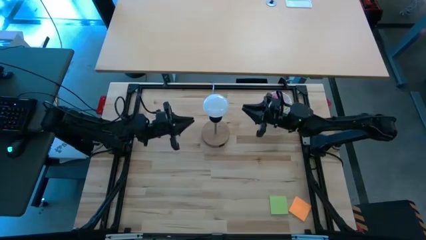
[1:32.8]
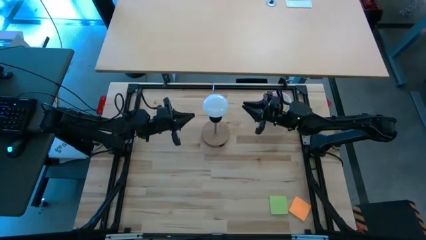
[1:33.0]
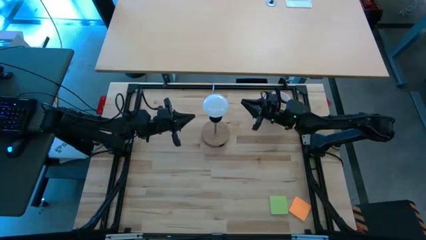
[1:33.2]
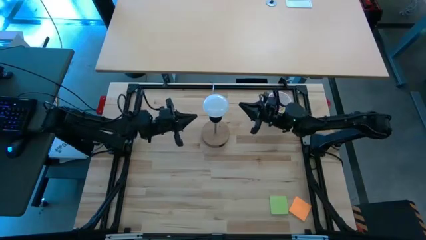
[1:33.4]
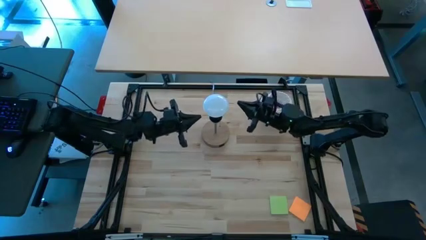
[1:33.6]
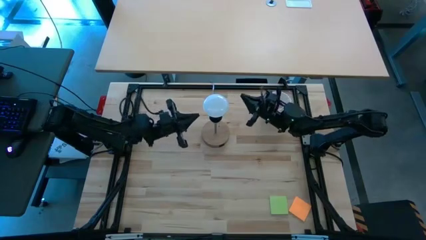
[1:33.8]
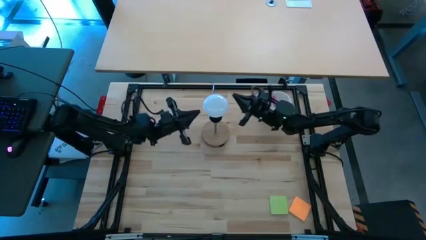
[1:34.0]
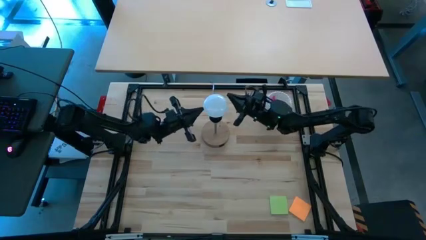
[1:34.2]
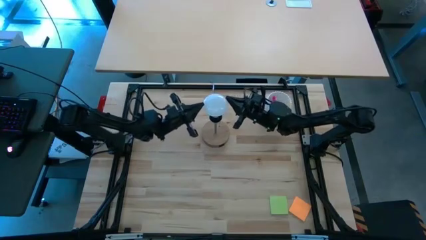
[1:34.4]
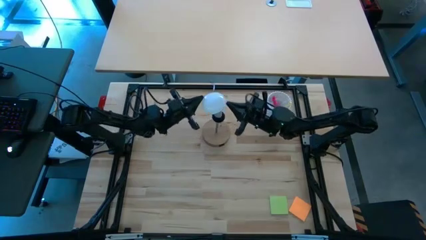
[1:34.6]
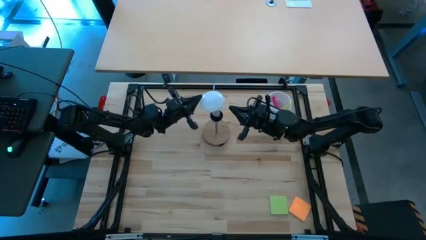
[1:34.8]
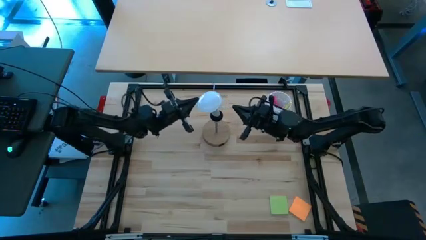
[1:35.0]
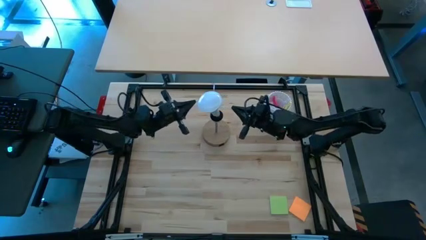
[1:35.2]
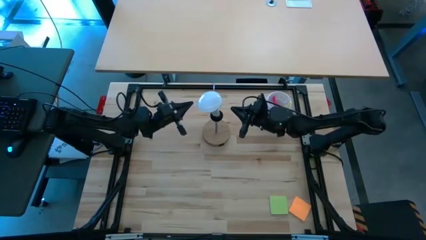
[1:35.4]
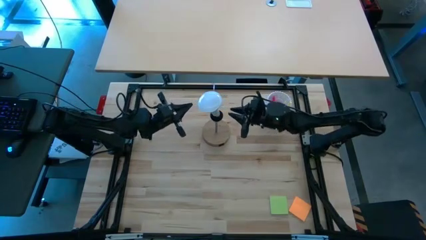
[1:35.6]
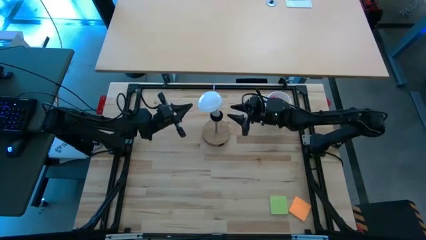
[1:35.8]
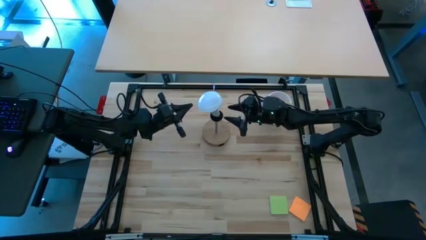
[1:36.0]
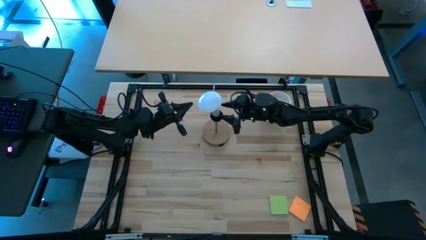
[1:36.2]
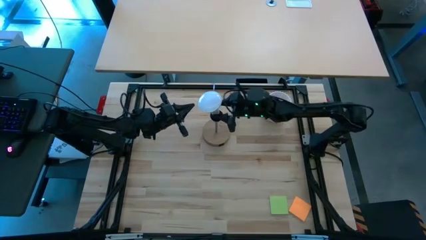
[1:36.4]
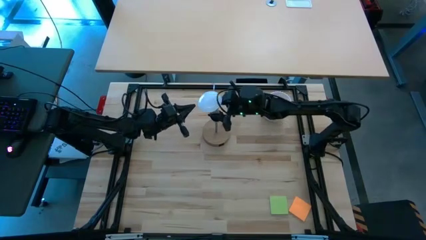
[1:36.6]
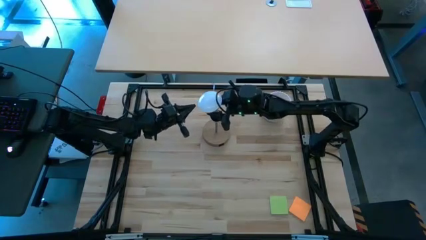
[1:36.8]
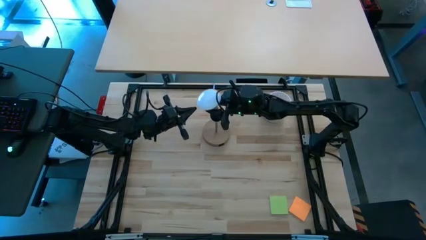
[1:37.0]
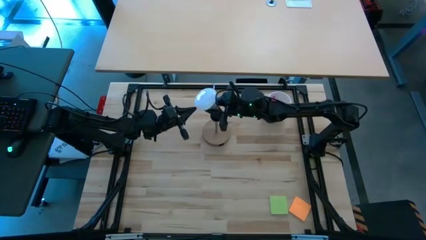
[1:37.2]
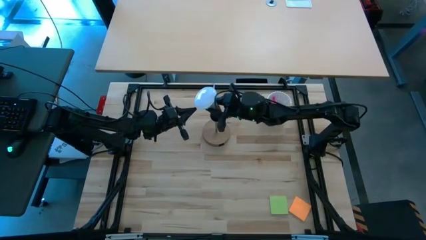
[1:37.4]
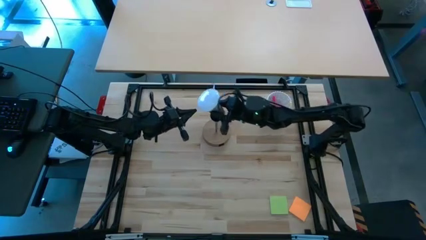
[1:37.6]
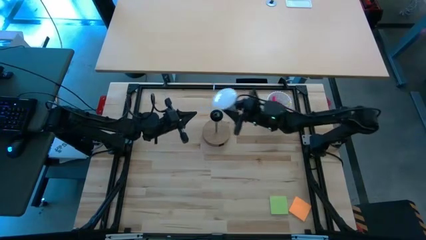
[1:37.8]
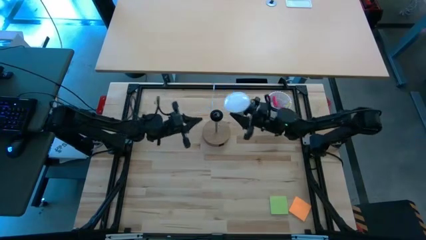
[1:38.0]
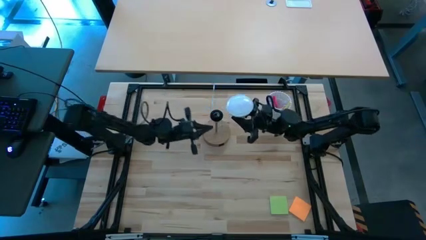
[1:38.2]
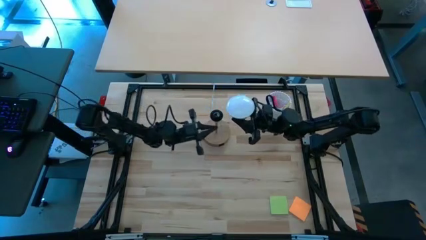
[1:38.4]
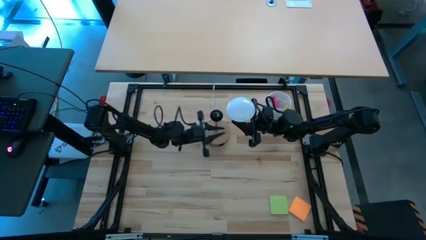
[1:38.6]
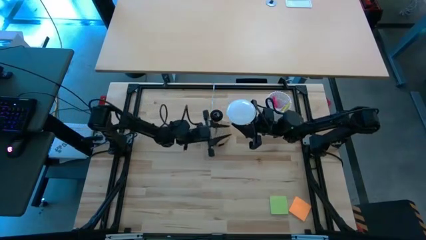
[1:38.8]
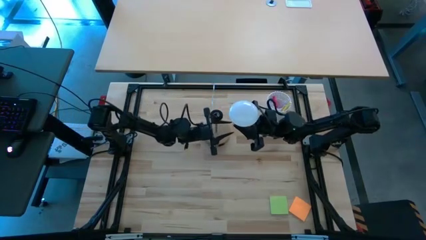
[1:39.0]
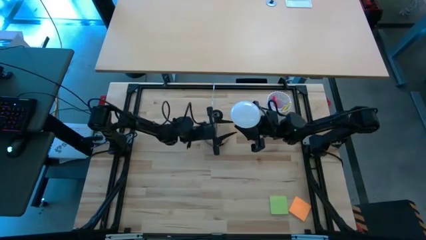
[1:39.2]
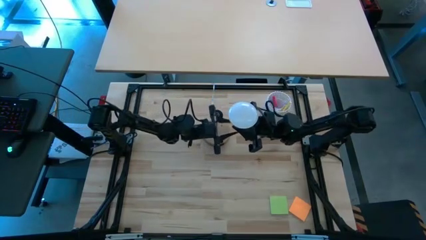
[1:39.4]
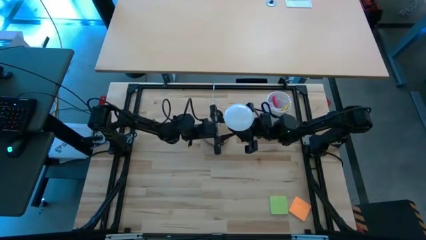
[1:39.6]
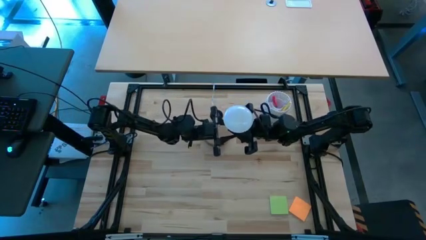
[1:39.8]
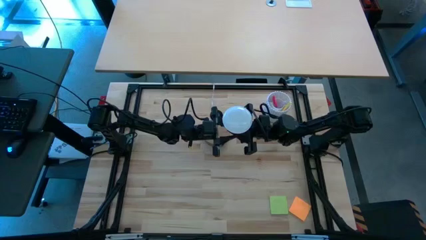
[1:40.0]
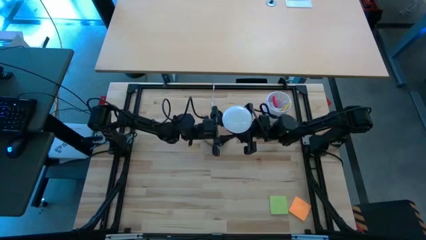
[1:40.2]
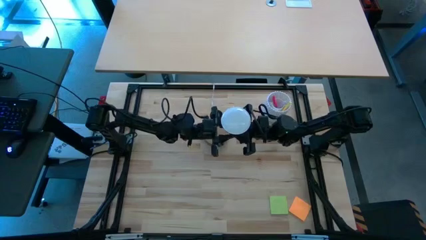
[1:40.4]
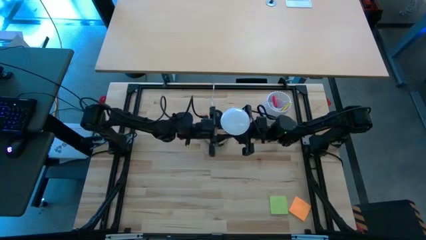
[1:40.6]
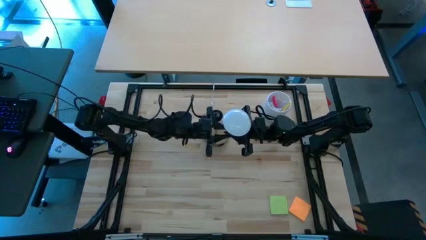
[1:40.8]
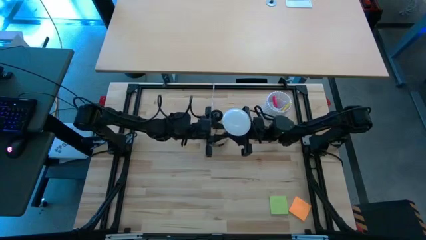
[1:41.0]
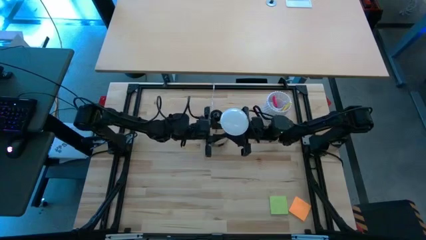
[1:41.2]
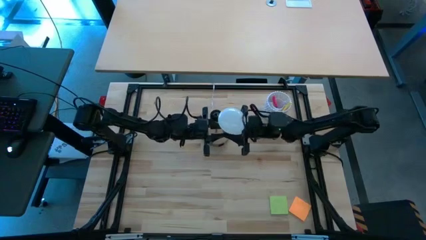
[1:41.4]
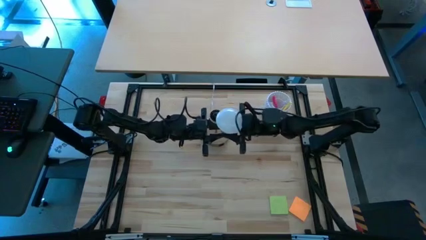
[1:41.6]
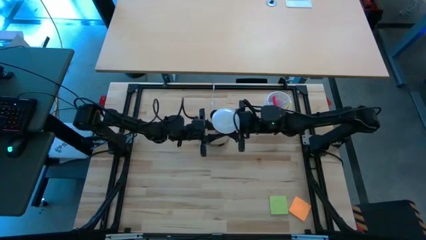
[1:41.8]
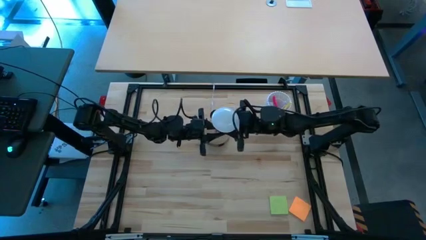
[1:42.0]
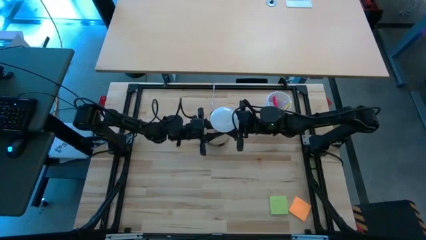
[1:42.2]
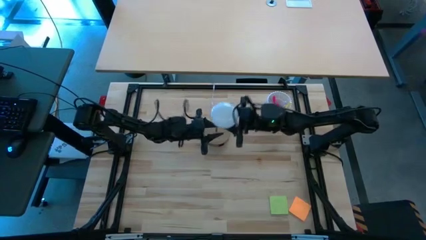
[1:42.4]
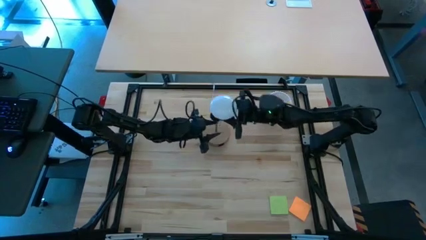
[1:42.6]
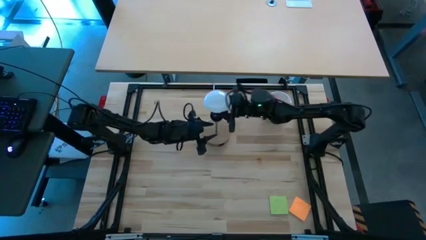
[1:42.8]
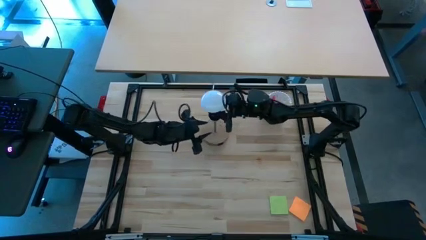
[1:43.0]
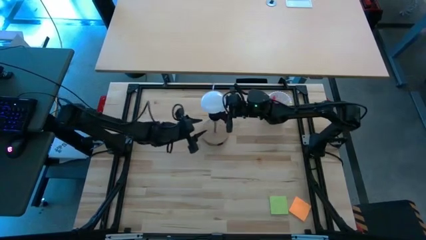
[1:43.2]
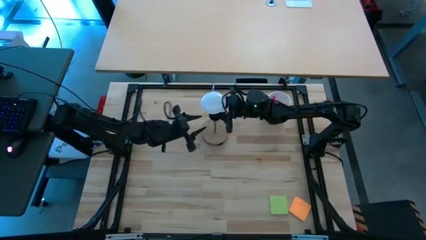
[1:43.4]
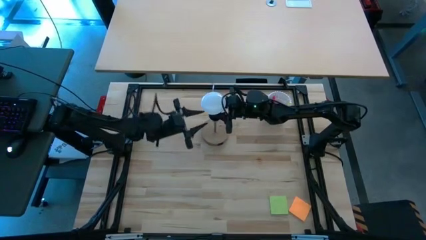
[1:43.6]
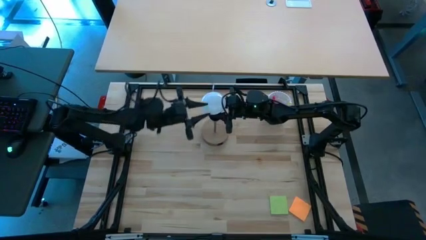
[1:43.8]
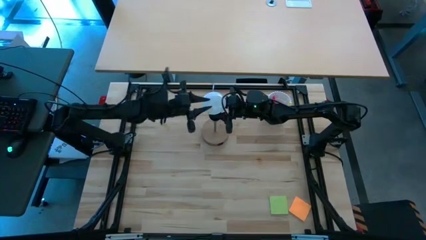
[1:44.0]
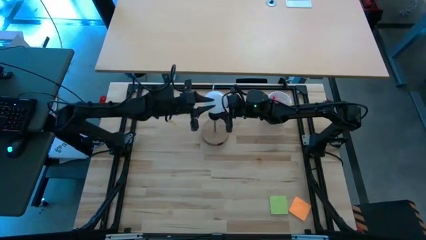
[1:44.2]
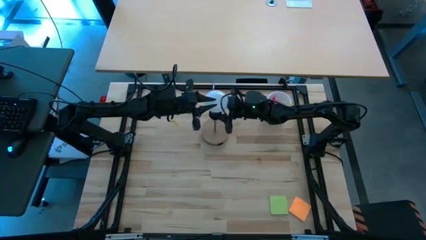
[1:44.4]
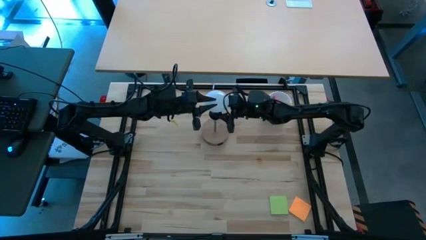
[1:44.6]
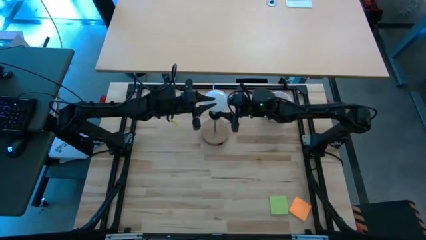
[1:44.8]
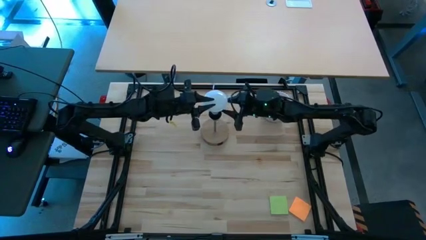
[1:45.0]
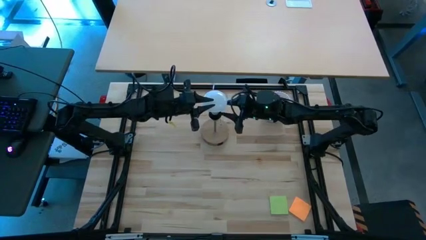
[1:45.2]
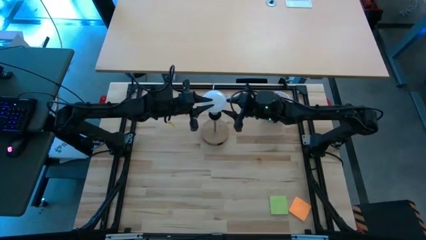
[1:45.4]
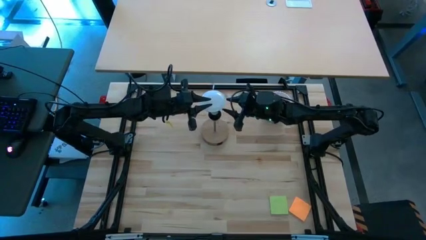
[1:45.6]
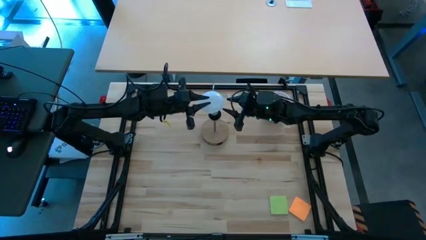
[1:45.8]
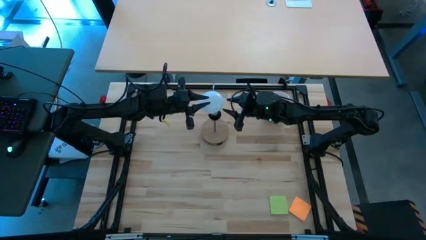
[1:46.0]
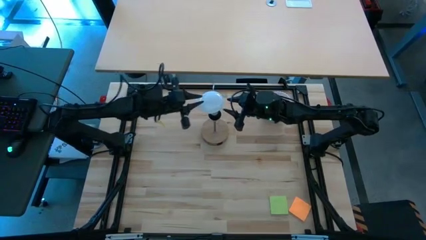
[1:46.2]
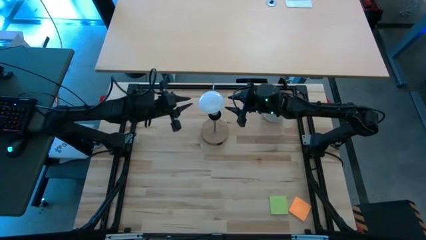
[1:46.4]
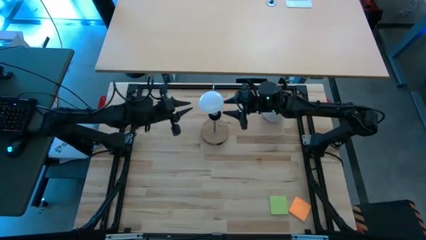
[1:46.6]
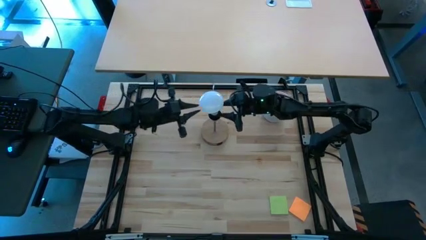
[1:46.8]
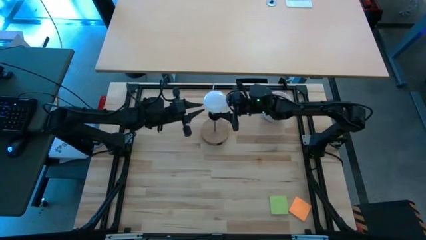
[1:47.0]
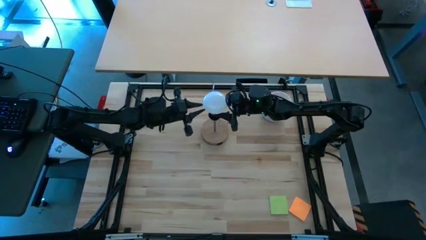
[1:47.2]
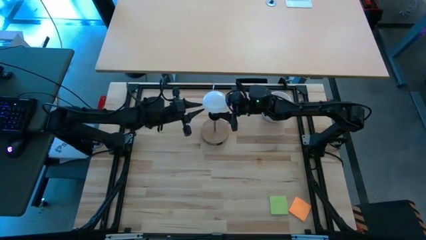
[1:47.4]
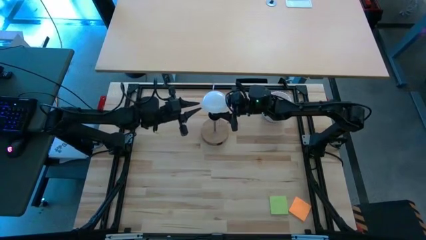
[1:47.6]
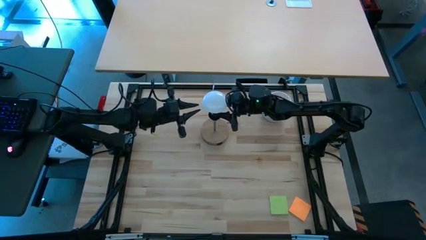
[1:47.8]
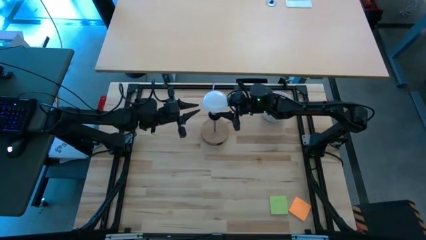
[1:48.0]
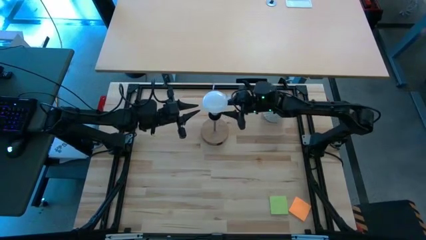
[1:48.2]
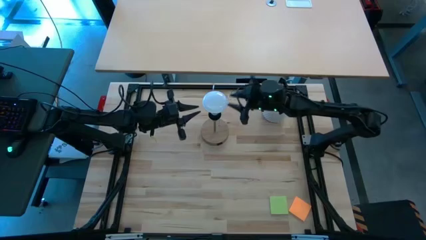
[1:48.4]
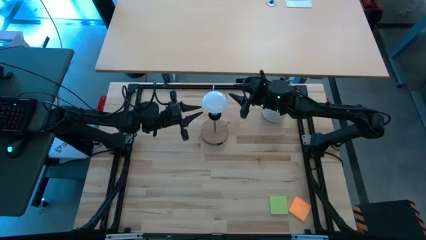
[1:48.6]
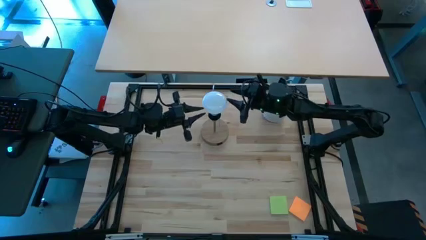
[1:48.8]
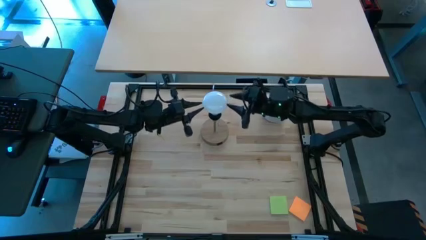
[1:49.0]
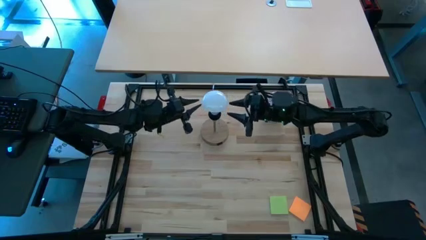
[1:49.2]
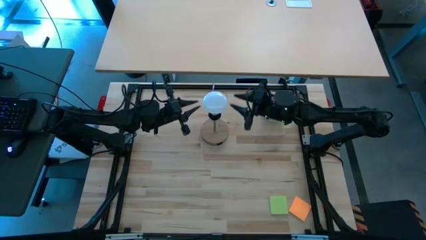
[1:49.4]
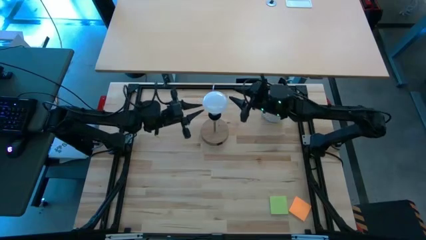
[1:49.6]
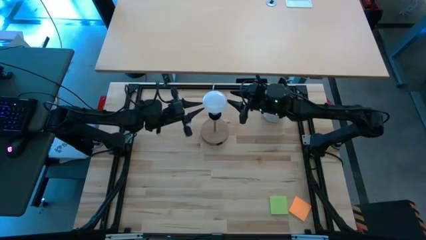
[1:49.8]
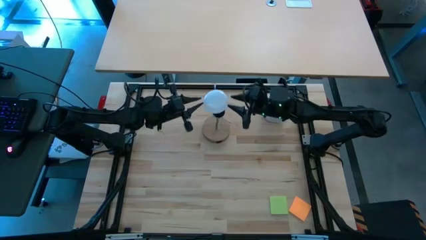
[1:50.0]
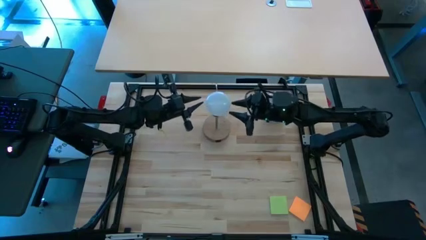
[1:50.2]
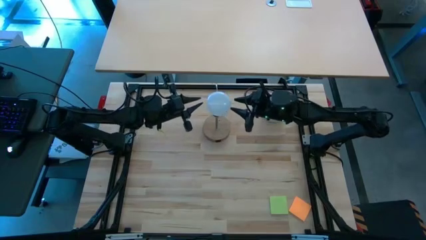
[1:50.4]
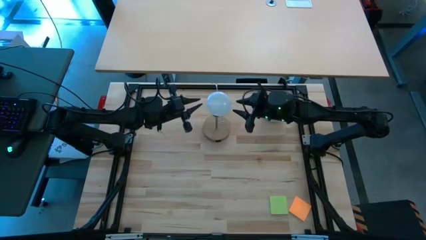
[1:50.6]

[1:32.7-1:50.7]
Task: Screw lightbulb
Insert the white lightbulb into the desk lamp
